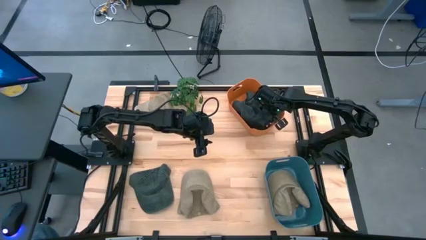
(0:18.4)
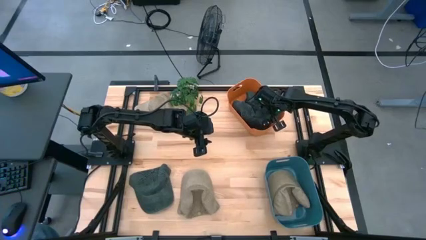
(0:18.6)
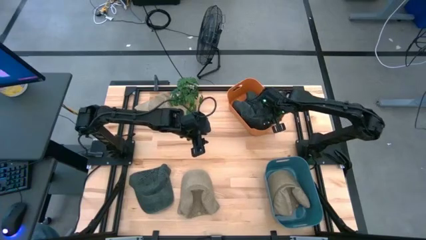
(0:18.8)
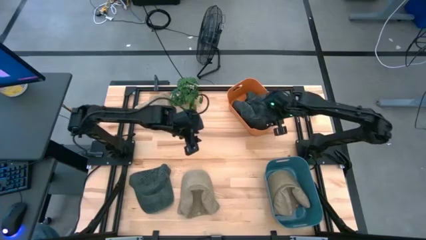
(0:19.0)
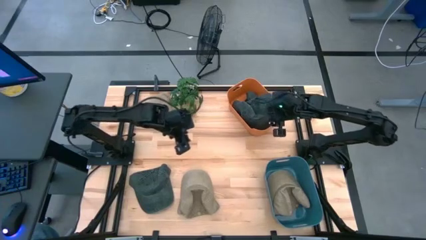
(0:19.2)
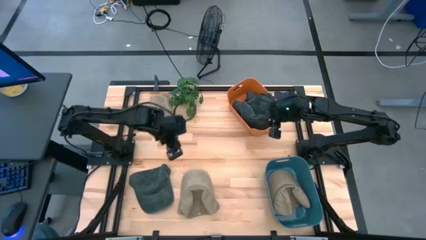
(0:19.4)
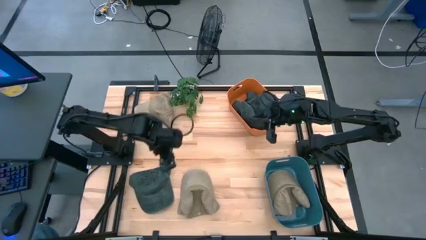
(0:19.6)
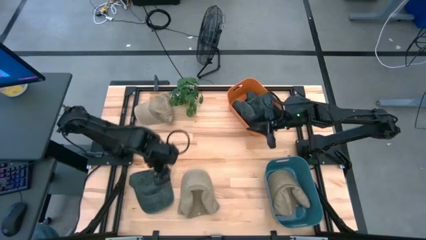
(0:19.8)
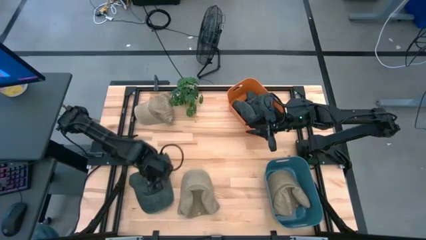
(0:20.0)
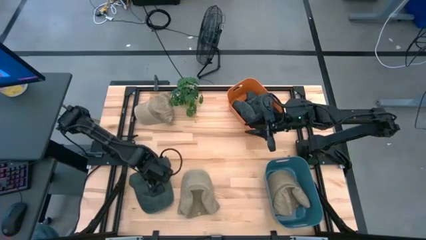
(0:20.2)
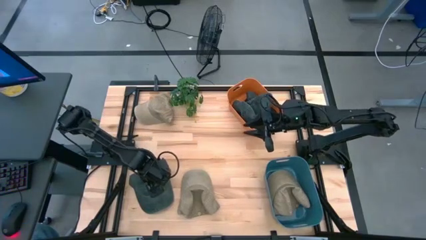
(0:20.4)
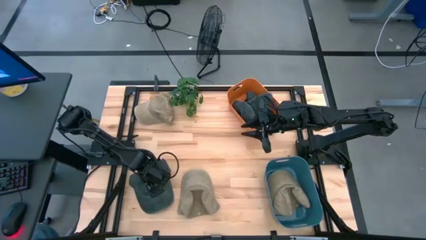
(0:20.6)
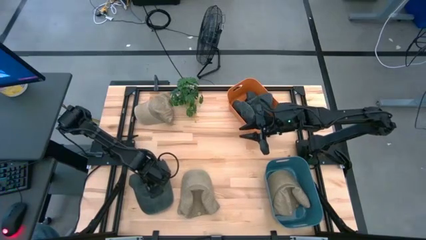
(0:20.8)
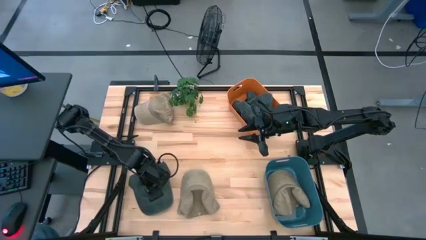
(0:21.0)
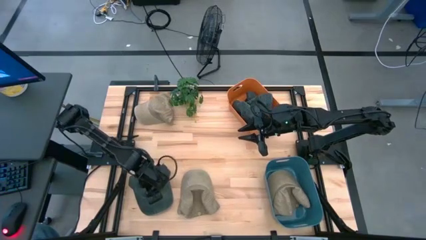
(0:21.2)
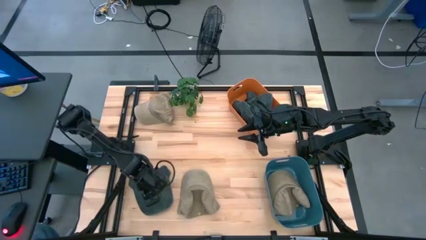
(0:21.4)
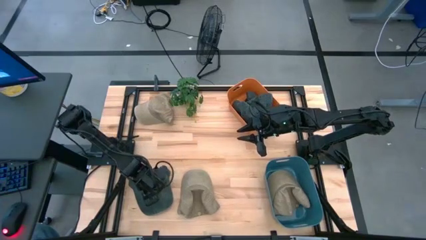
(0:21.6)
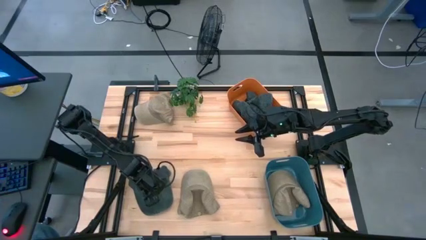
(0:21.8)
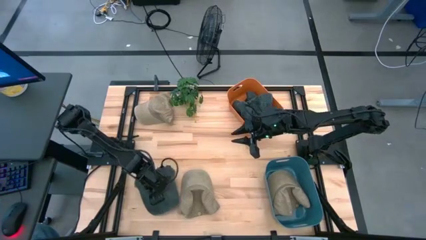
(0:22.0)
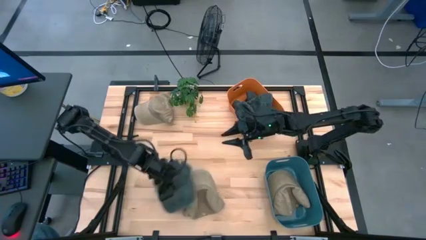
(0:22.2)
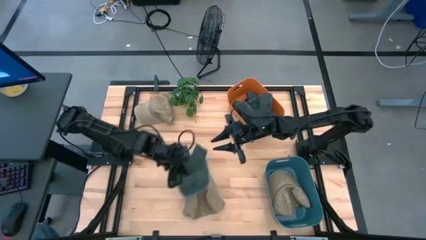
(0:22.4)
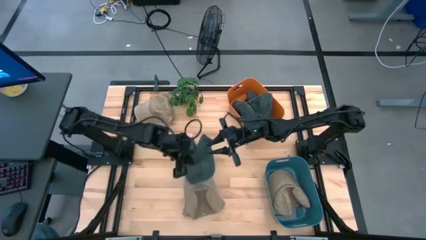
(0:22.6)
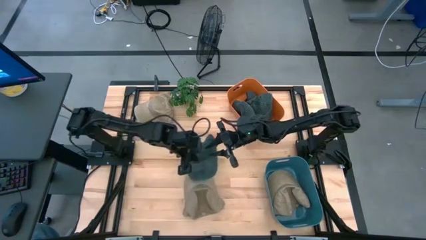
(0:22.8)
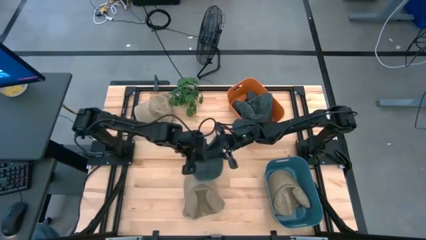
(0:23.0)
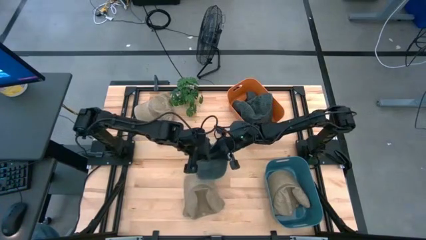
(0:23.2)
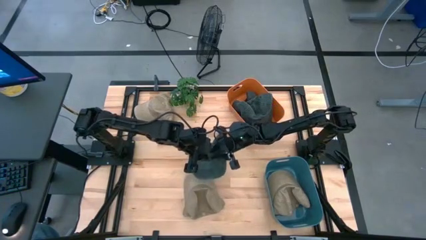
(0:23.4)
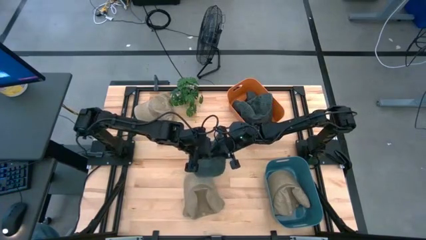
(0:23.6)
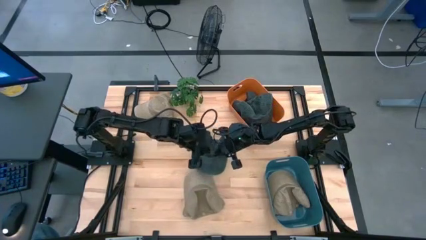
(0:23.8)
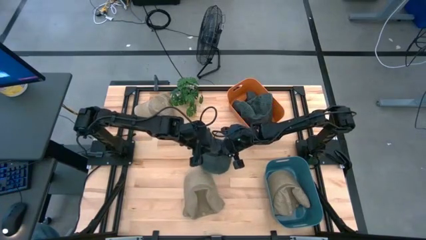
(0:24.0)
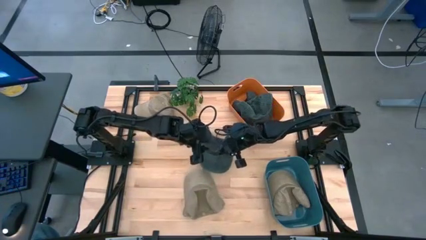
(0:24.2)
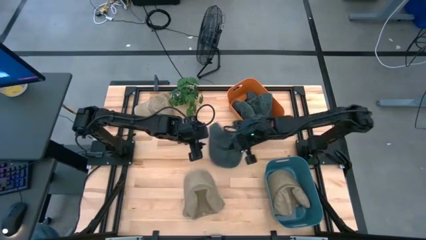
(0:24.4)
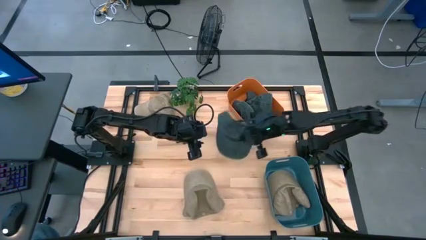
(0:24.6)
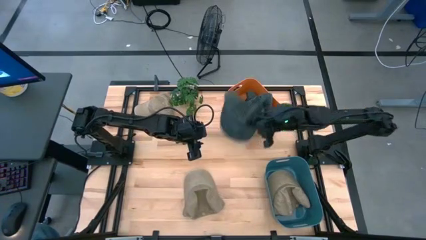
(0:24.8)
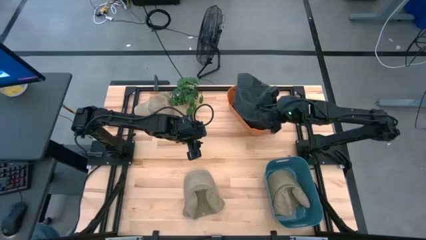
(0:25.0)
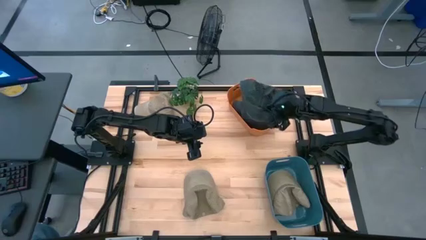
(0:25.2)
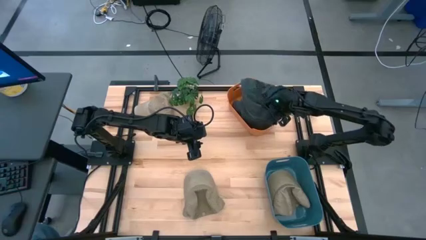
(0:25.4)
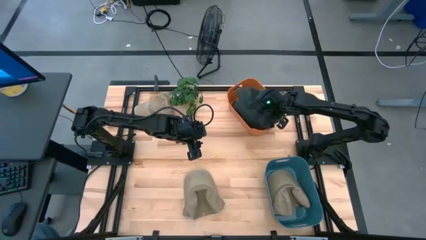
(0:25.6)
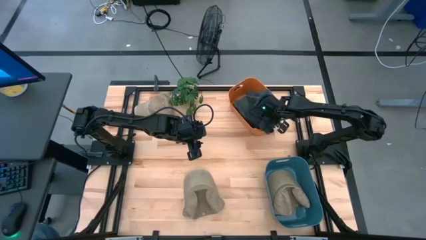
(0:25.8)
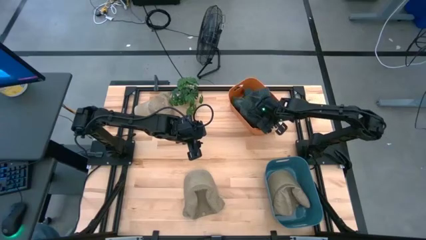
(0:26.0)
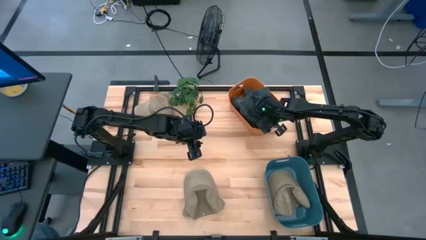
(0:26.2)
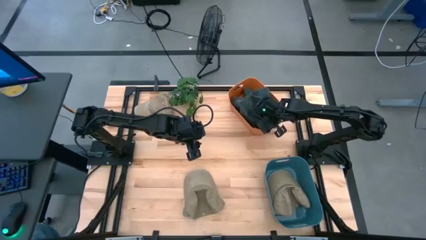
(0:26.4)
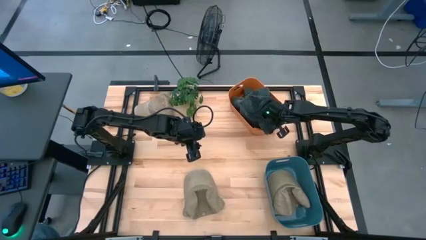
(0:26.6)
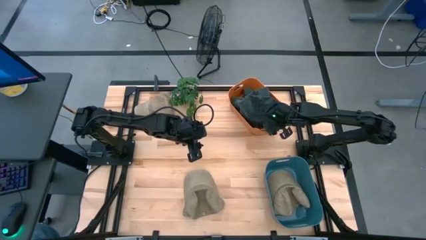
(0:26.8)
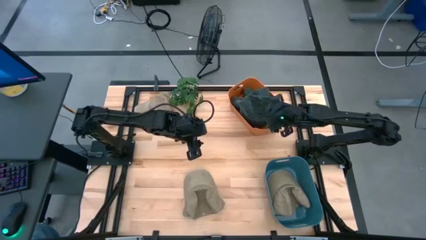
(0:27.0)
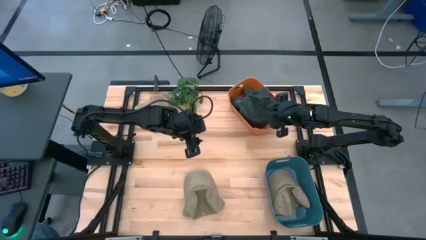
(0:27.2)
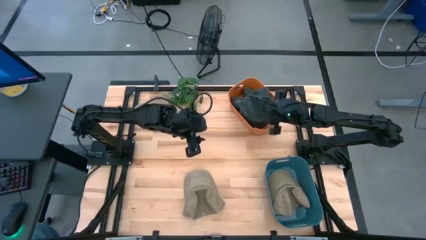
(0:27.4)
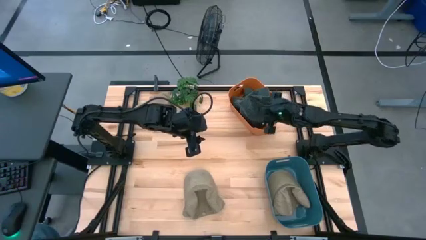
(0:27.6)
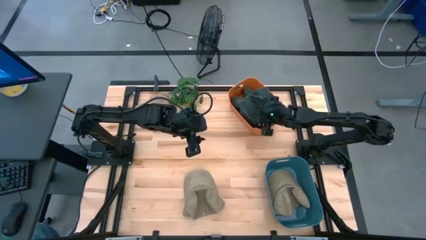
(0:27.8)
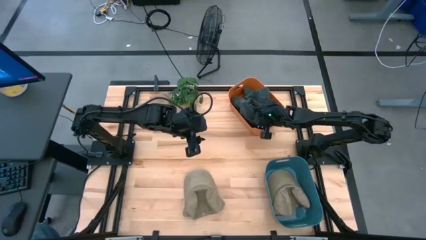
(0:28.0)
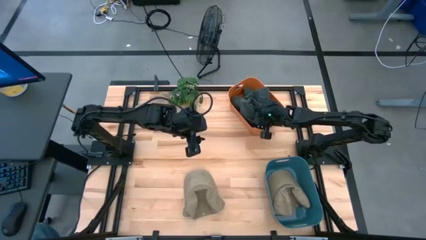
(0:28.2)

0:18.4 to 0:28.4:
Task: Pick & Place hat
Put the gray cap into the orange bin

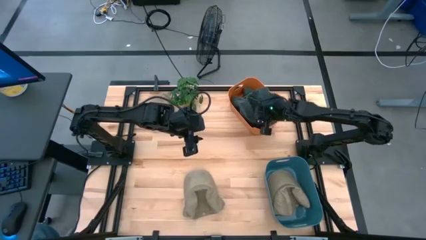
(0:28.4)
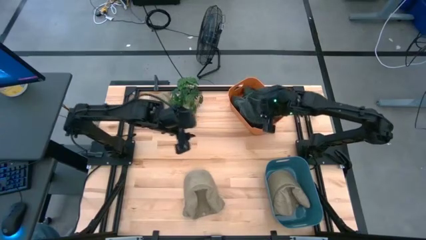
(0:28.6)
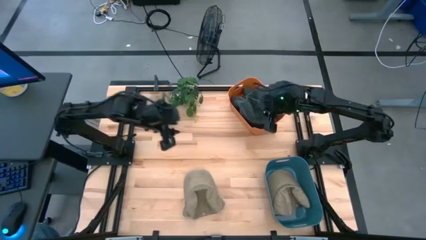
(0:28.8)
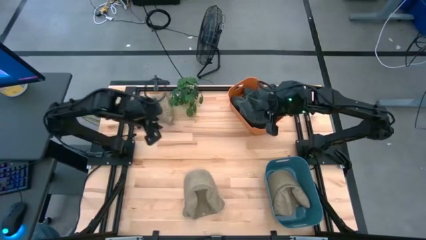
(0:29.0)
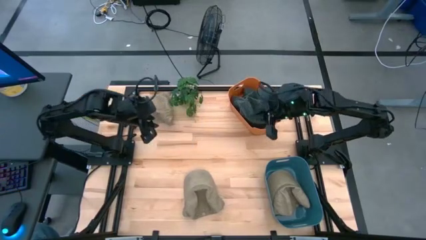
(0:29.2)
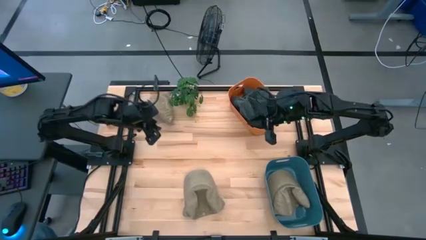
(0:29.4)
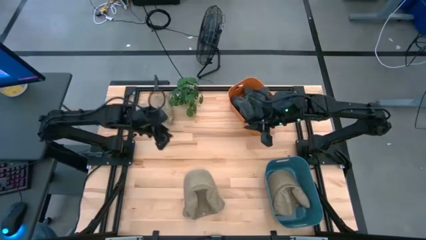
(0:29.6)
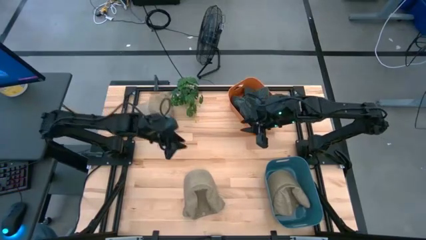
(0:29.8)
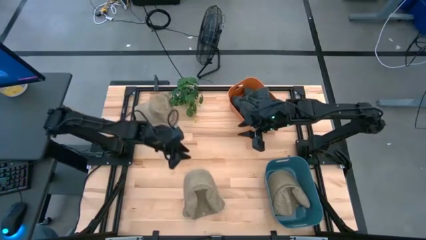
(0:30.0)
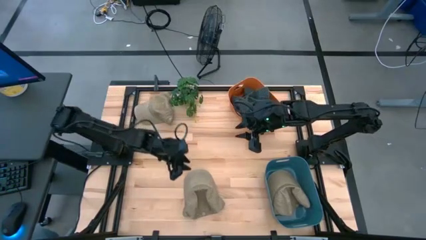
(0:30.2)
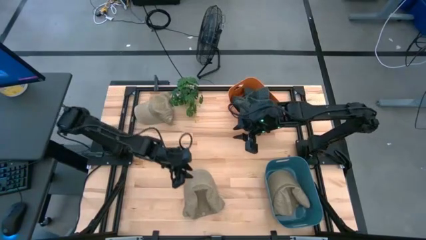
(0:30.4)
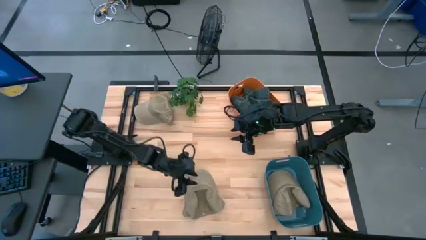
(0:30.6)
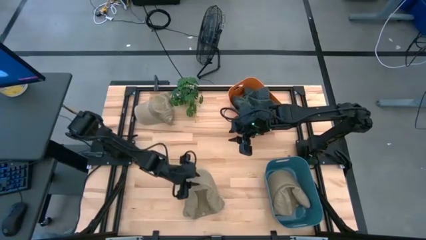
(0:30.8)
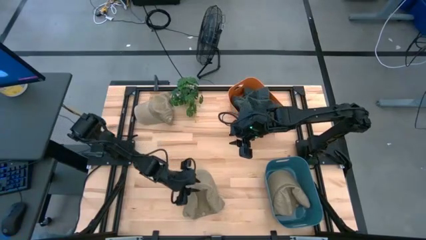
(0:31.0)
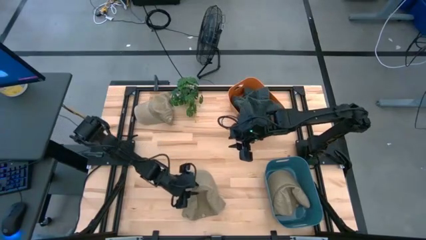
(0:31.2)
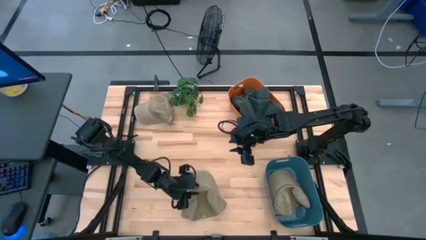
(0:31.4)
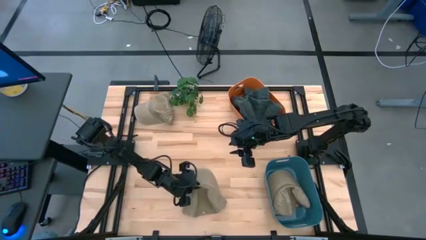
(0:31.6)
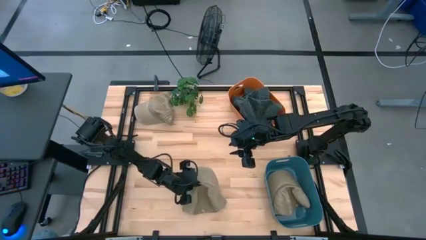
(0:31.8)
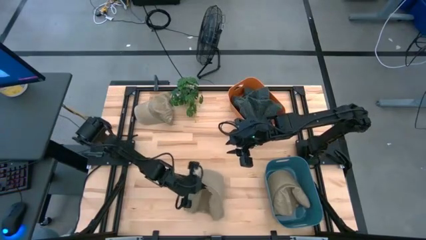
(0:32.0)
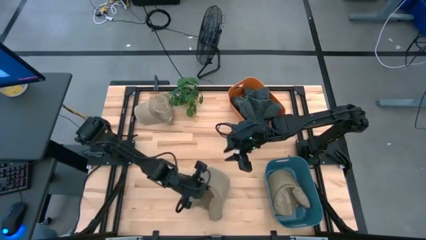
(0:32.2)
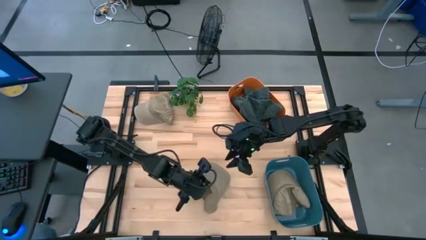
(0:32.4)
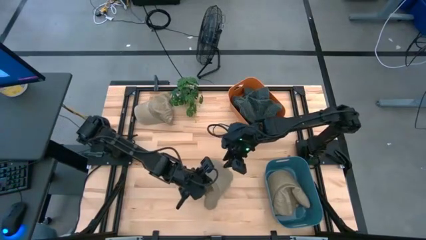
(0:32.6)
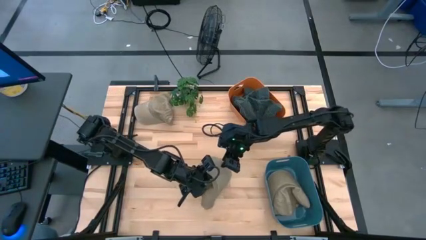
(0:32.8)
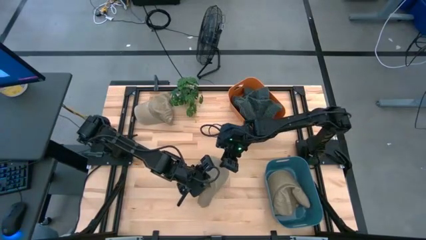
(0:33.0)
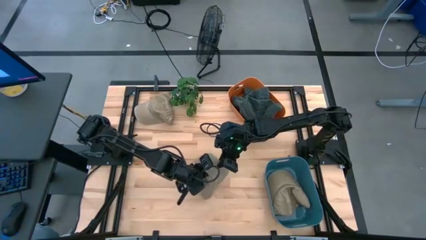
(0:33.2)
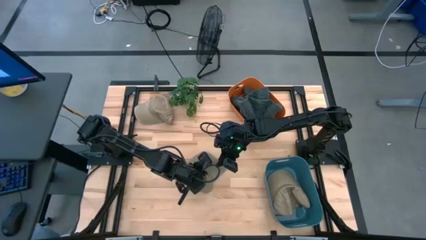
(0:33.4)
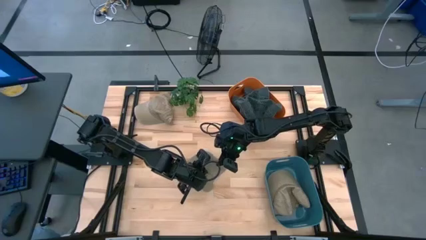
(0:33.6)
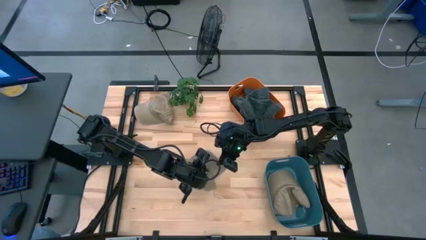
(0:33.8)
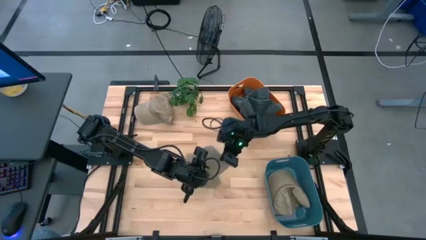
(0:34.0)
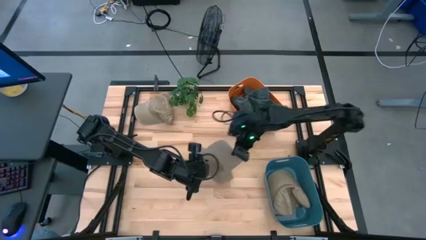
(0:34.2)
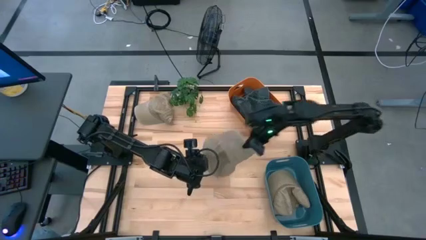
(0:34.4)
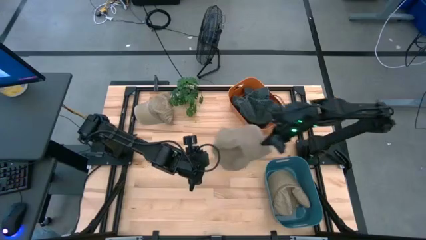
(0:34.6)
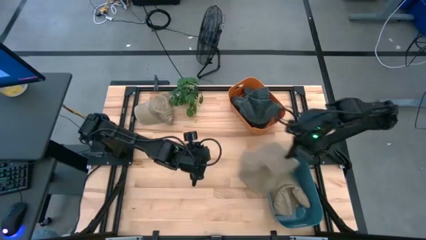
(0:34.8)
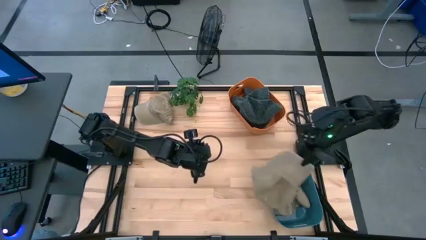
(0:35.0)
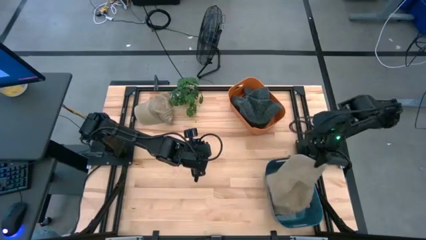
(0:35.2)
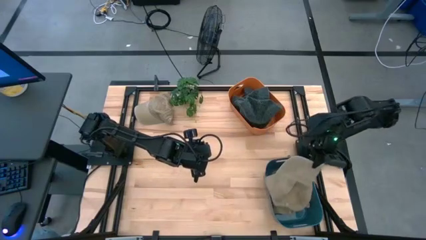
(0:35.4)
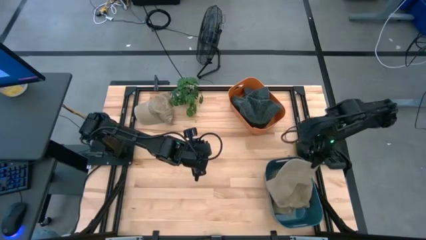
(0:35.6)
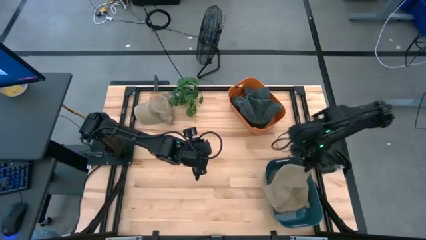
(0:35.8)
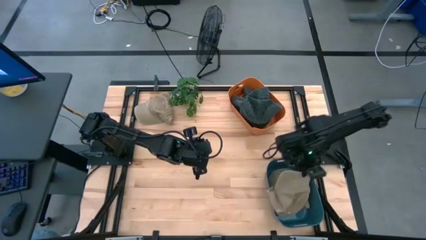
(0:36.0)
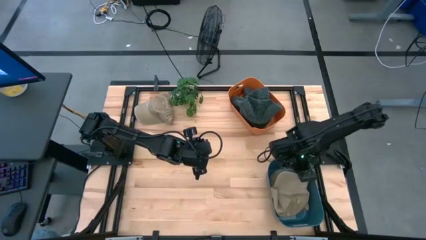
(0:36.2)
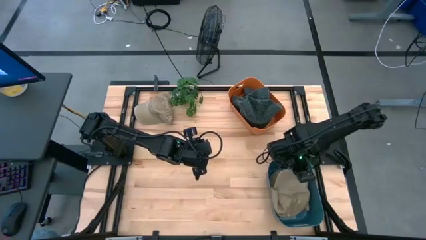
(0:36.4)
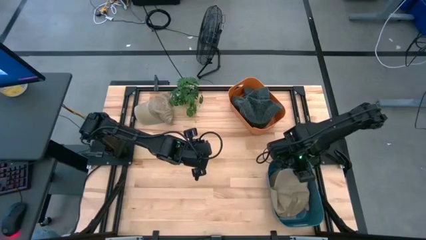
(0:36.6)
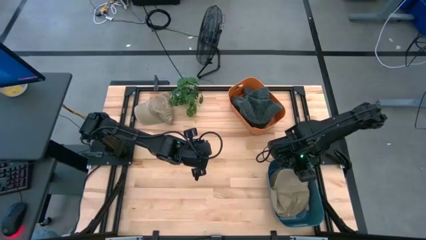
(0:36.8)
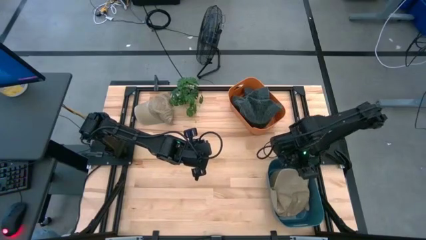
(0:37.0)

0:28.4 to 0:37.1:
Put the bottom brown cap into the blue bin
